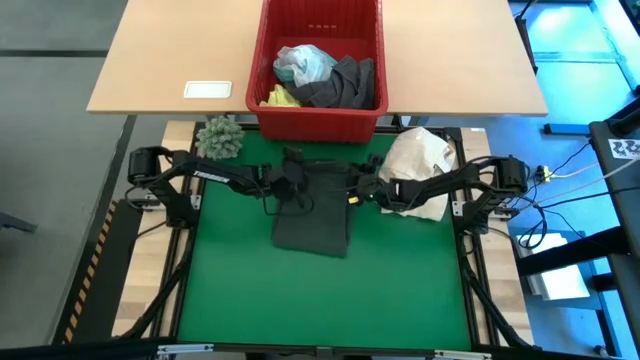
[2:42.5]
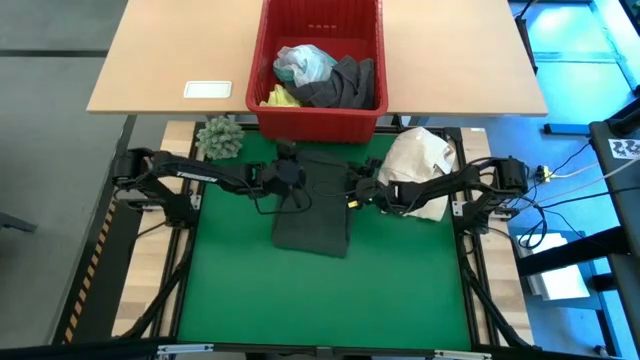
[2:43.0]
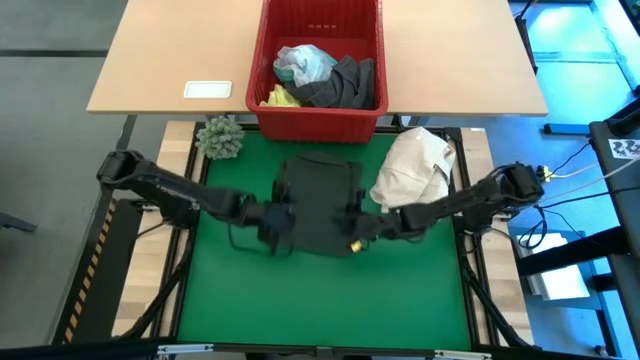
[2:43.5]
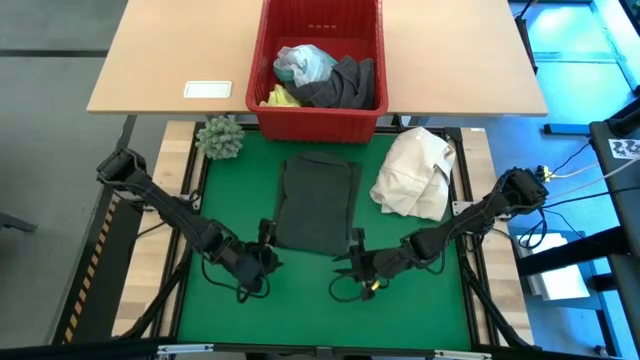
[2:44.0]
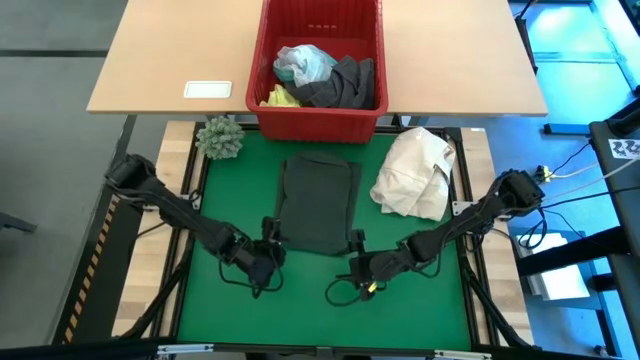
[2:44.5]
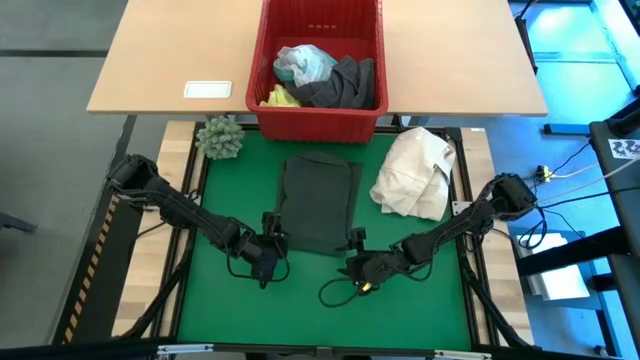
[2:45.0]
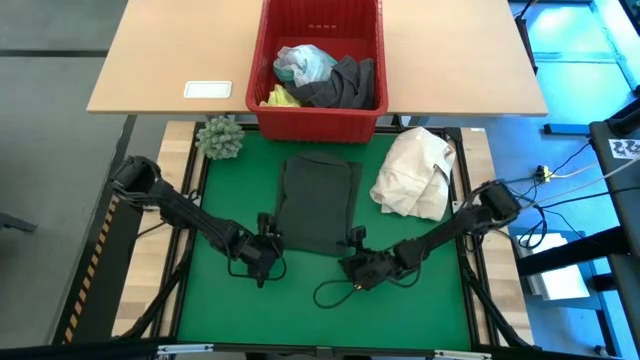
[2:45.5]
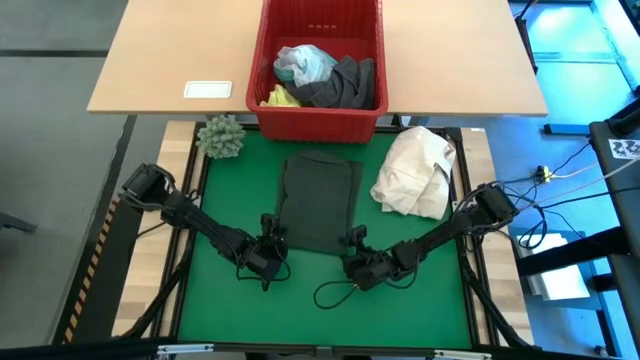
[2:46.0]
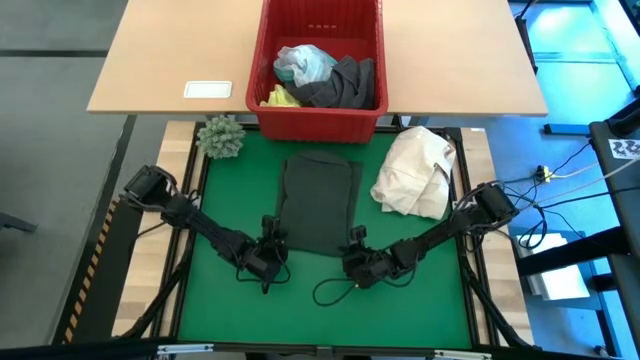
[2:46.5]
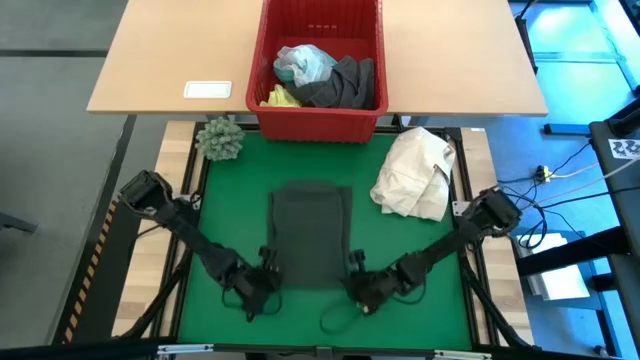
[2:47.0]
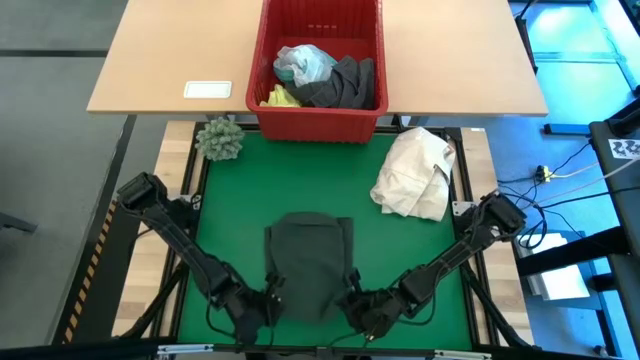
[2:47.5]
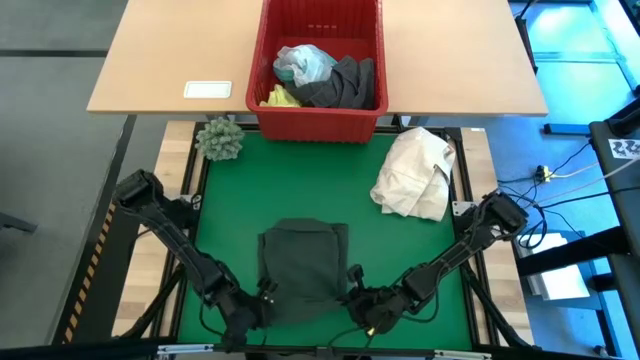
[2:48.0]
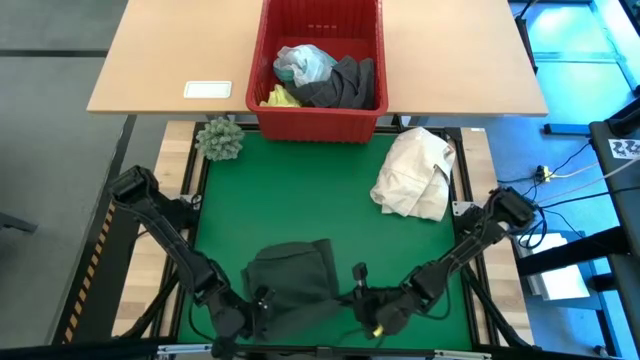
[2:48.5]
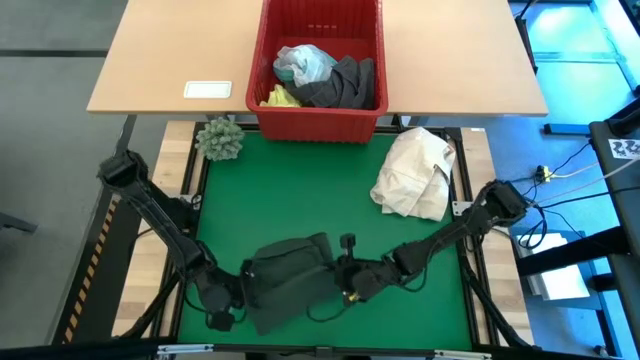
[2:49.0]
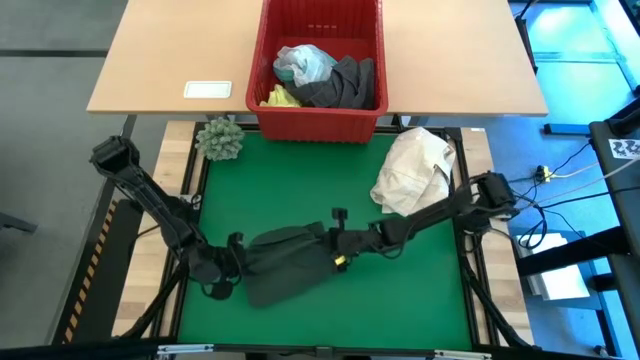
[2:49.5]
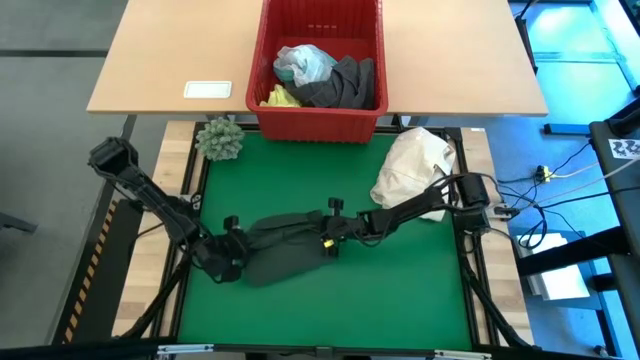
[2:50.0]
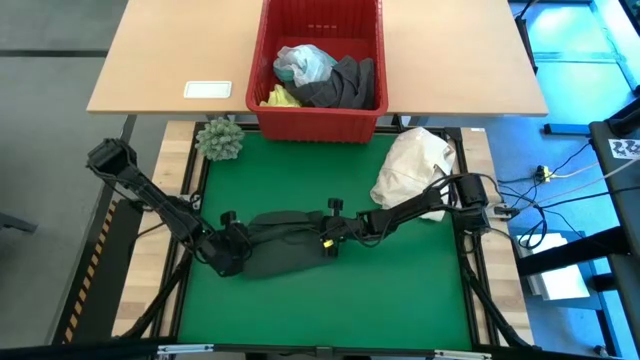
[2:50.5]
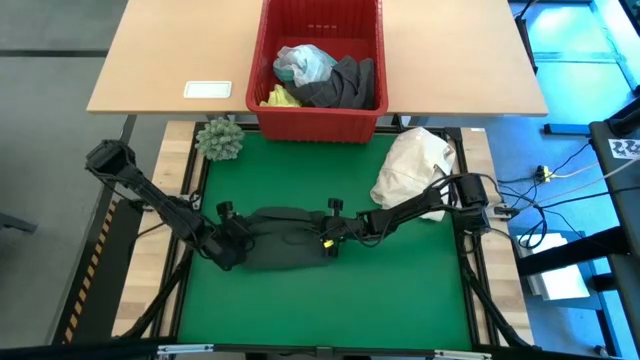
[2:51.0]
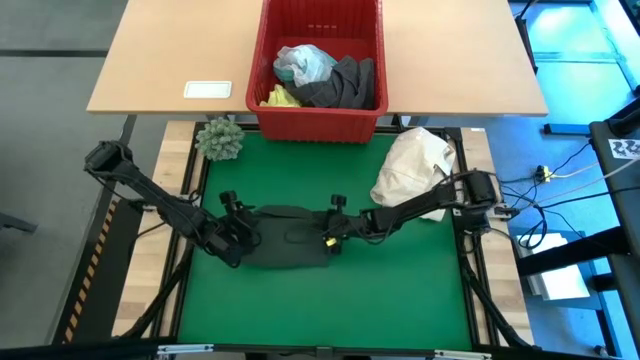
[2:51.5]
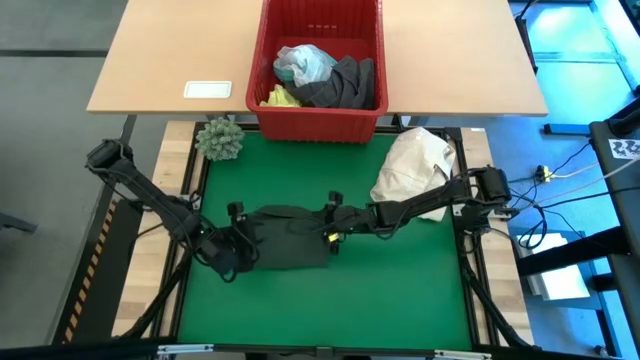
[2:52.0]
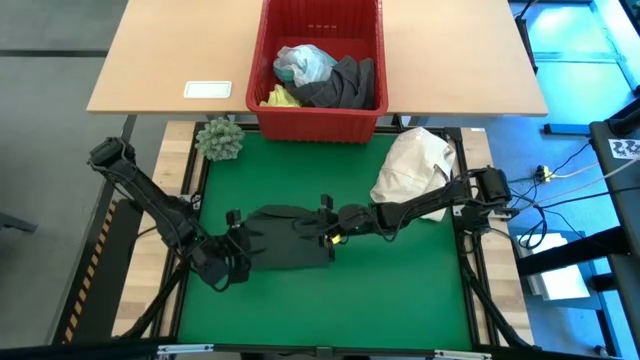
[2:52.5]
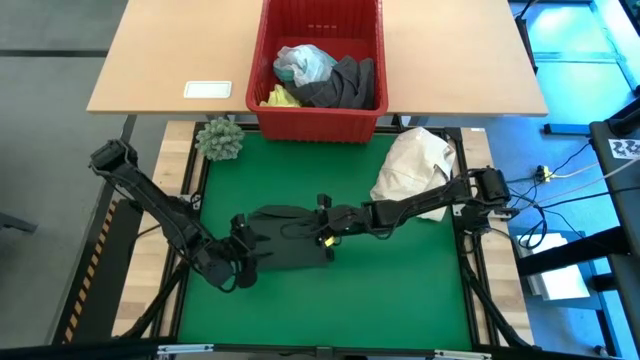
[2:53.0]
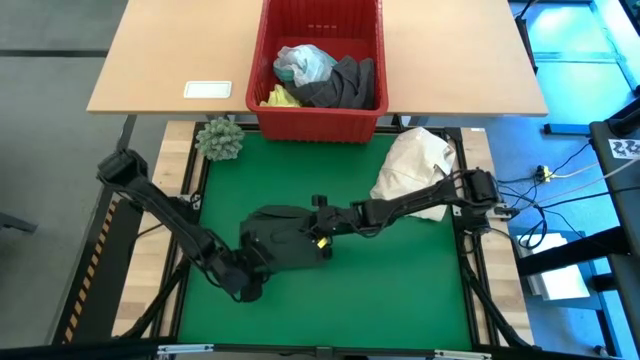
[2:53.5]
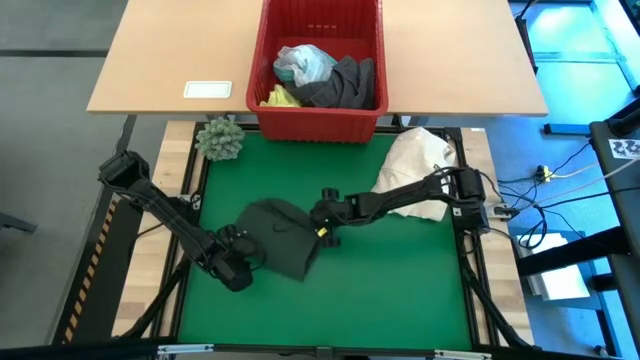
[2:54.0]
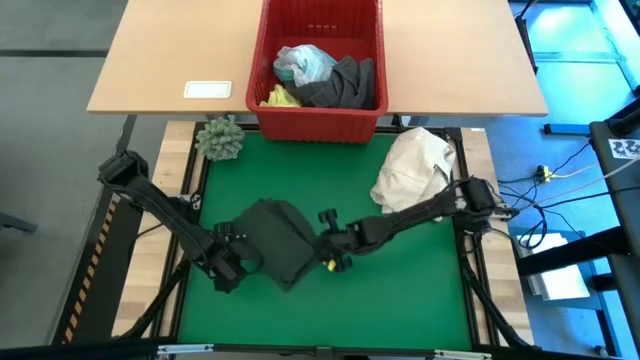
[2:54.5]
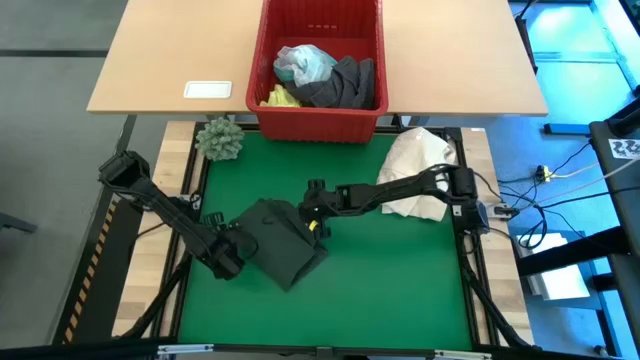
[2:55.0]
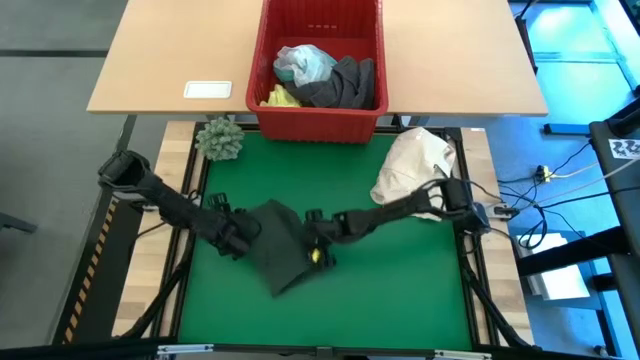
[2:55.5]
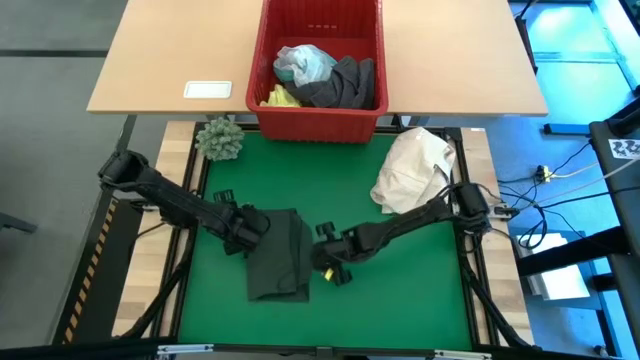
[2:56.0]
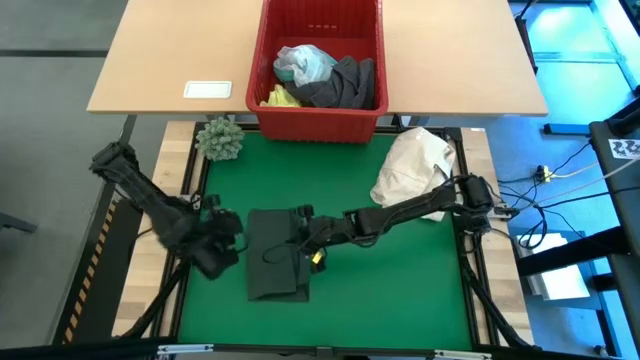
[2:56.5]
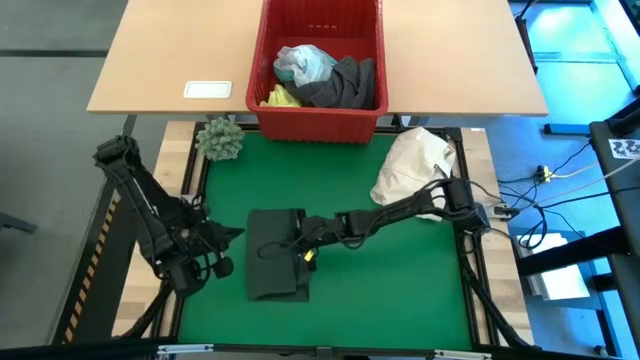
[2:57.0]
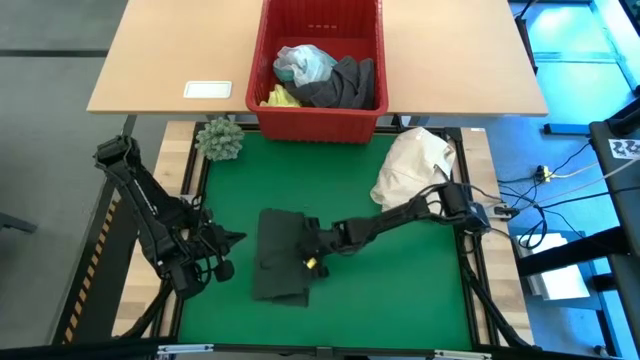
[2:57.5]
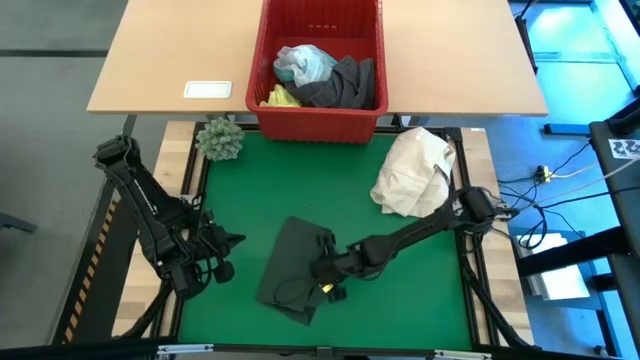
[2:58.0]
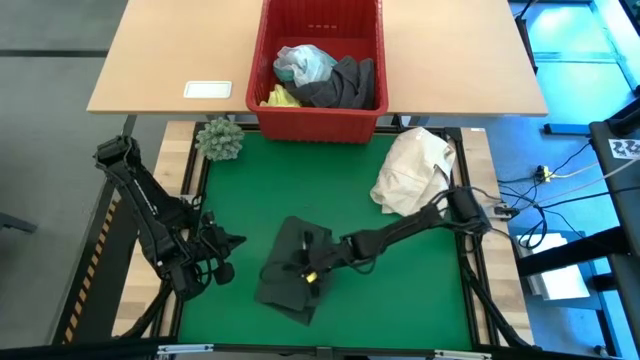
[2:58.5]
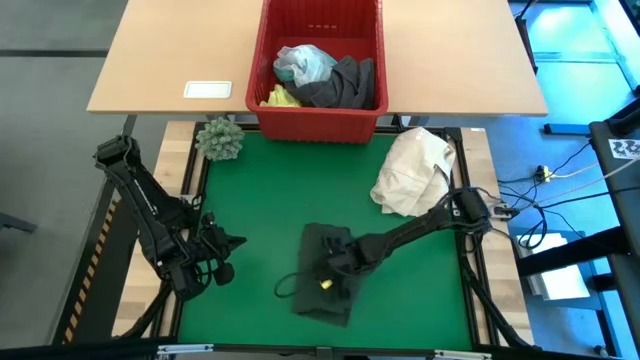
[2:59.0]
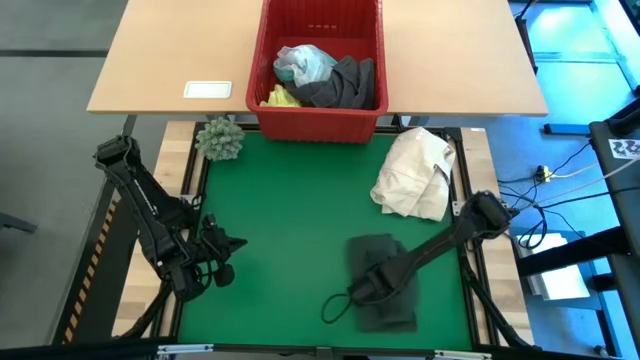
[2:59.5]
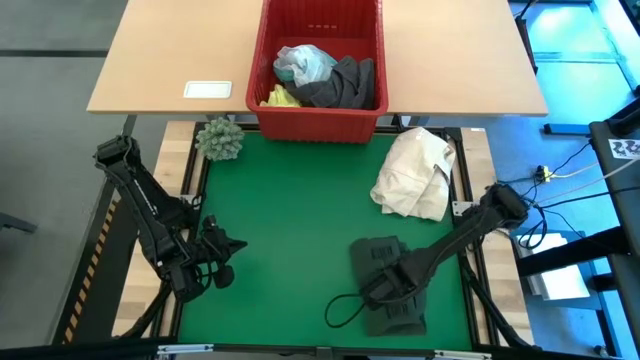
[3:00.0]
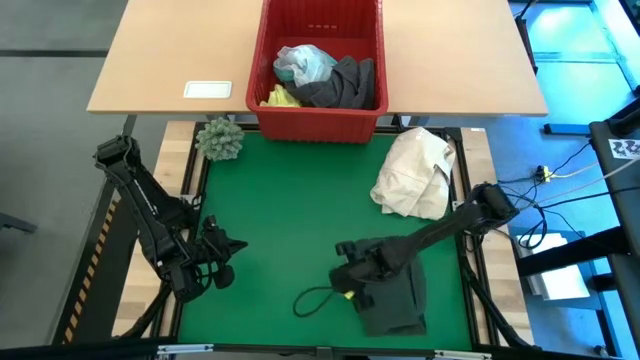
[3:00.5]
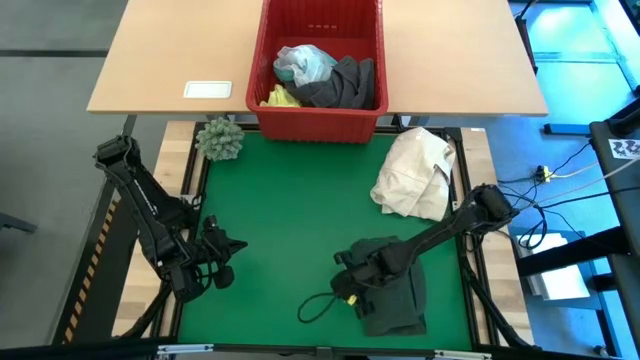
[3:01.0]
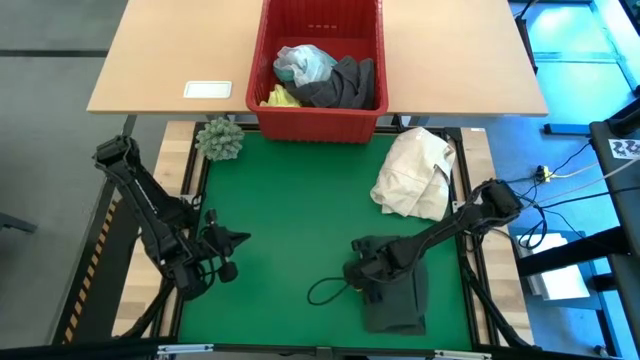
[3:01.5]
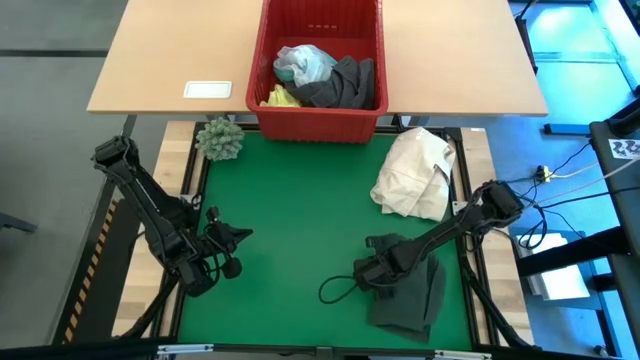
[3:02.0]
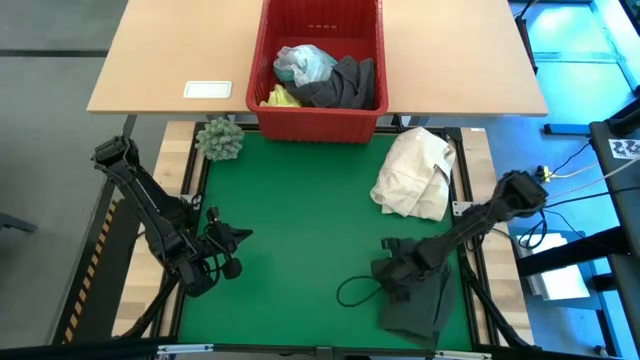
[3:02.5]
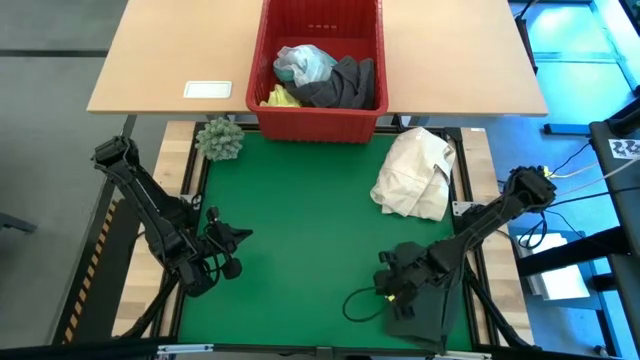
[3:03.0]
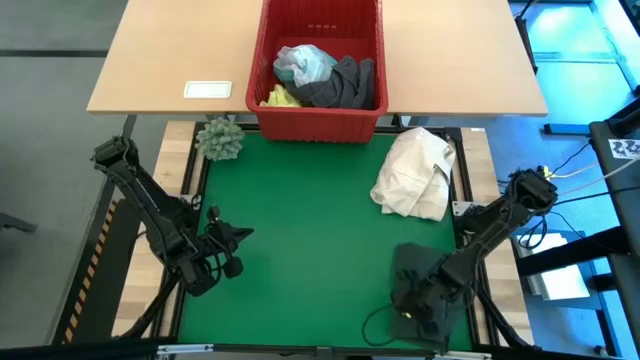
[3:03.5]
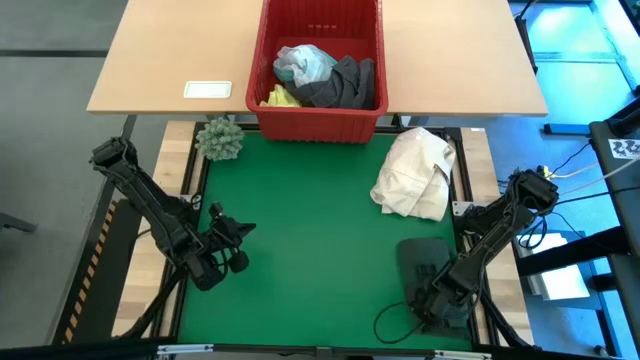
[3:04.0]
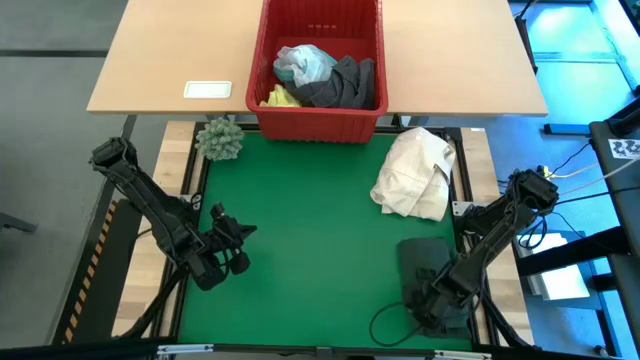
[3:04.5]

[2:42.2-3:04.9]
Task: Fold Laundry from Bin
Fold the dark green polo
